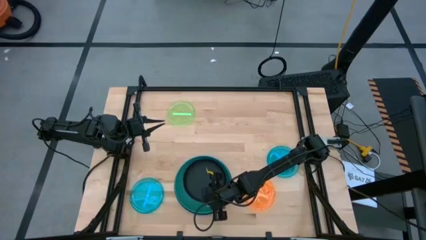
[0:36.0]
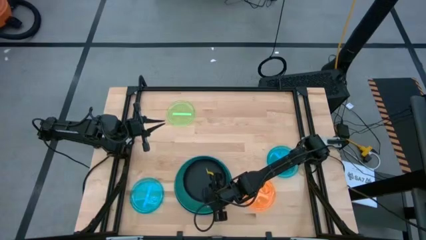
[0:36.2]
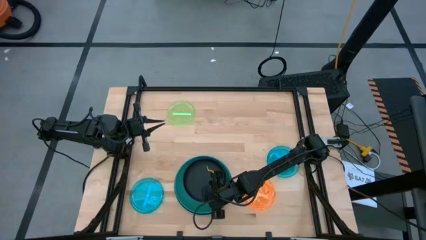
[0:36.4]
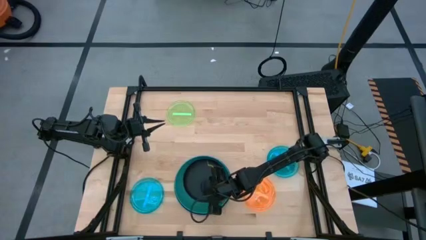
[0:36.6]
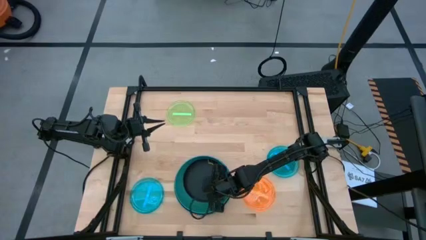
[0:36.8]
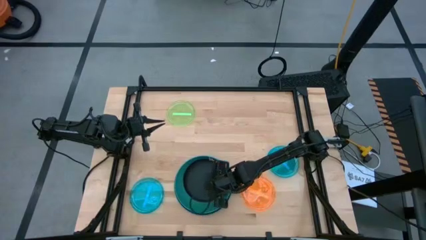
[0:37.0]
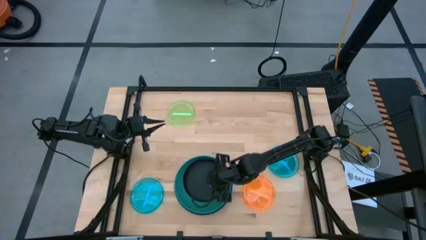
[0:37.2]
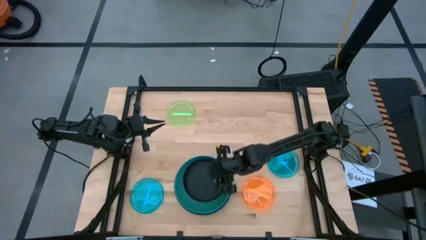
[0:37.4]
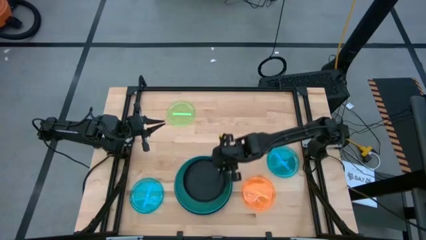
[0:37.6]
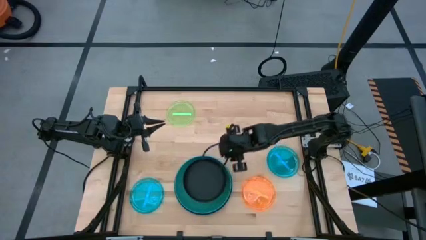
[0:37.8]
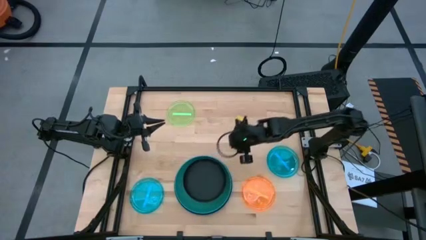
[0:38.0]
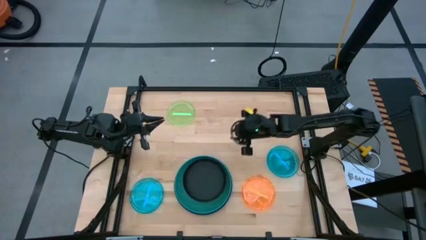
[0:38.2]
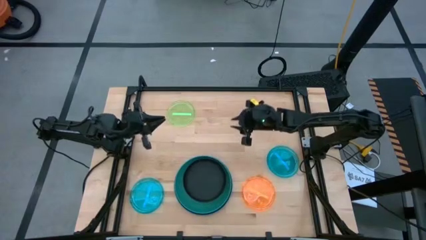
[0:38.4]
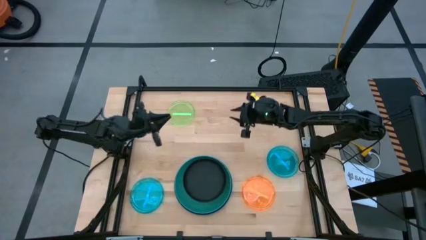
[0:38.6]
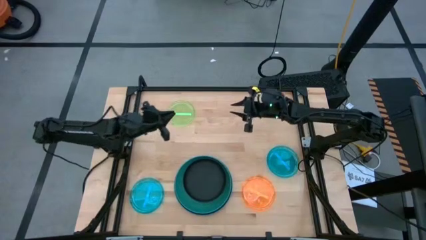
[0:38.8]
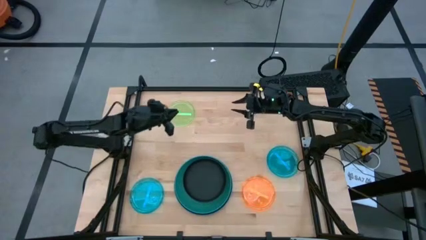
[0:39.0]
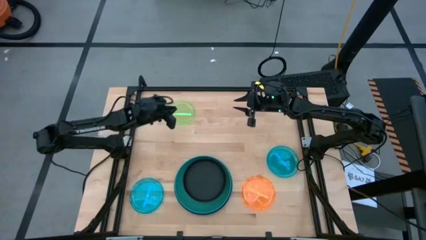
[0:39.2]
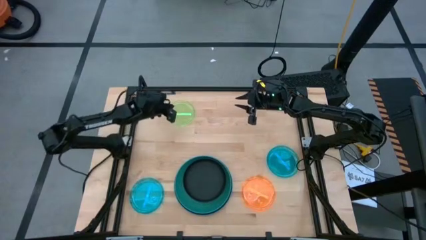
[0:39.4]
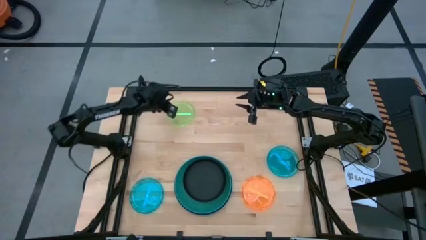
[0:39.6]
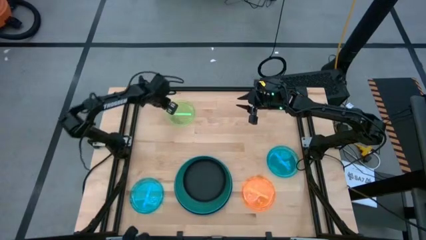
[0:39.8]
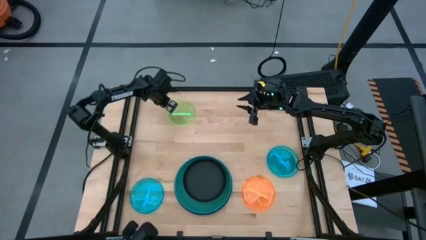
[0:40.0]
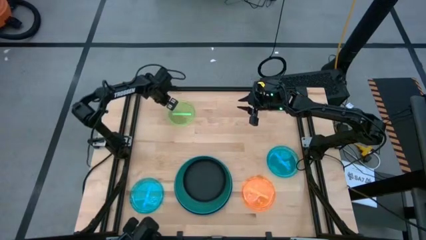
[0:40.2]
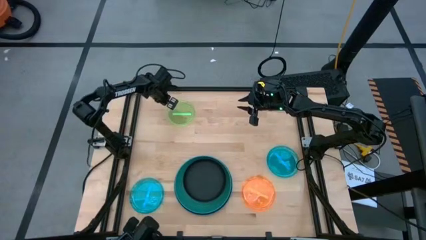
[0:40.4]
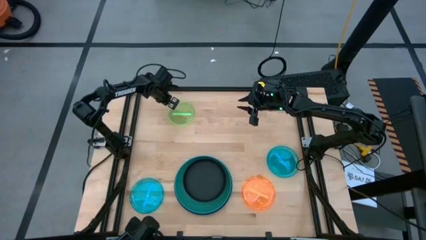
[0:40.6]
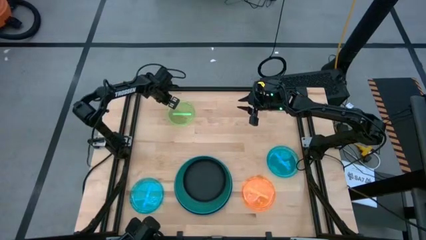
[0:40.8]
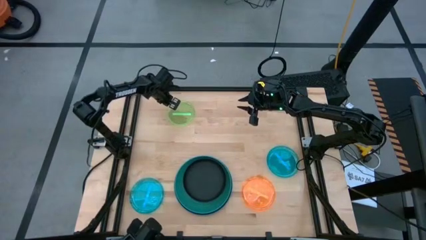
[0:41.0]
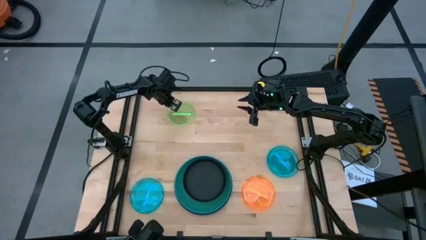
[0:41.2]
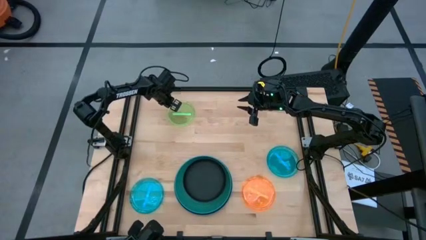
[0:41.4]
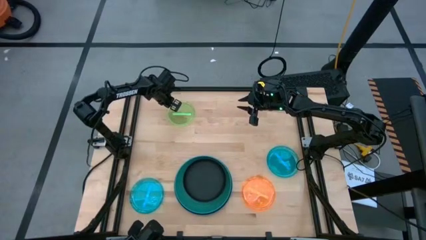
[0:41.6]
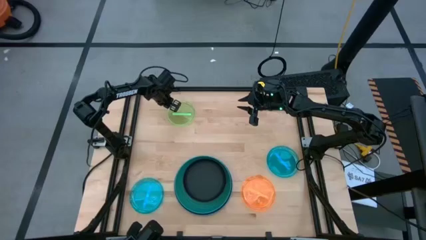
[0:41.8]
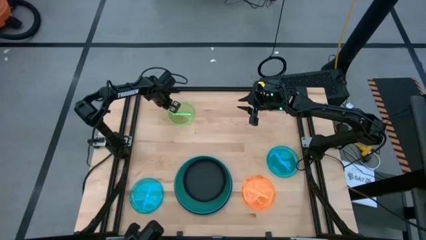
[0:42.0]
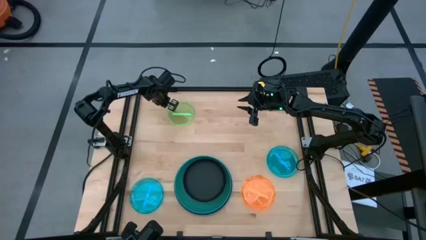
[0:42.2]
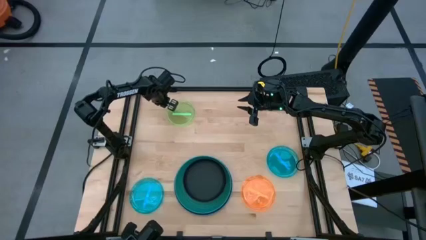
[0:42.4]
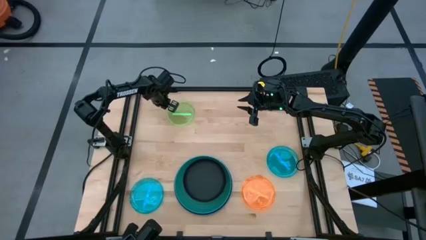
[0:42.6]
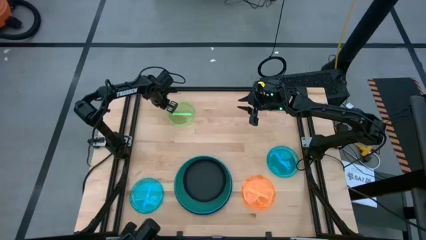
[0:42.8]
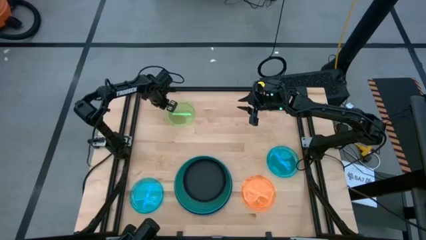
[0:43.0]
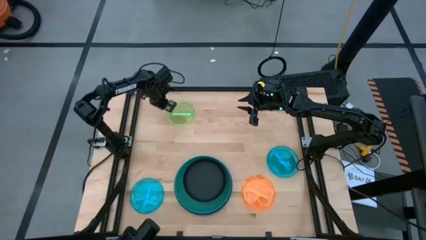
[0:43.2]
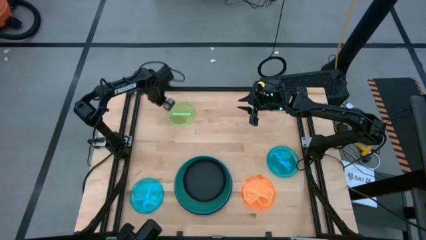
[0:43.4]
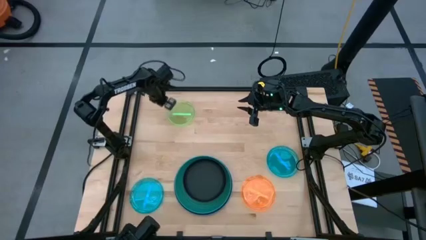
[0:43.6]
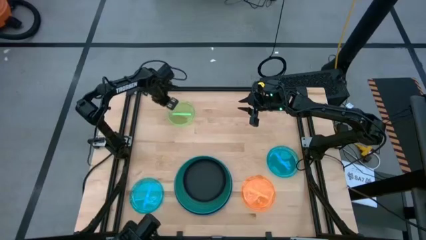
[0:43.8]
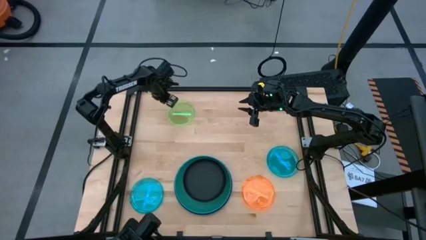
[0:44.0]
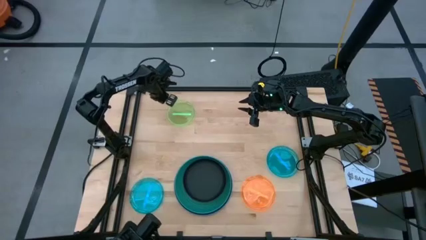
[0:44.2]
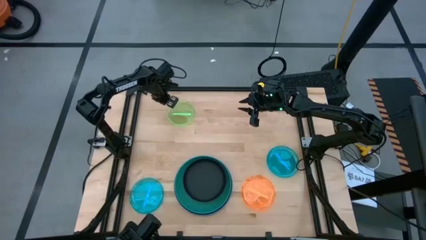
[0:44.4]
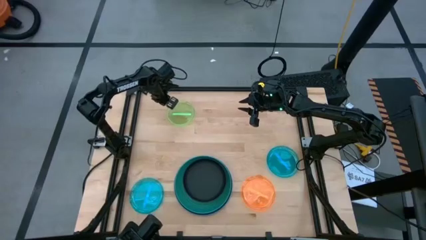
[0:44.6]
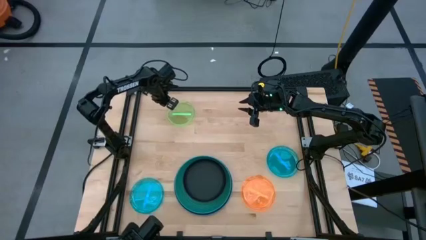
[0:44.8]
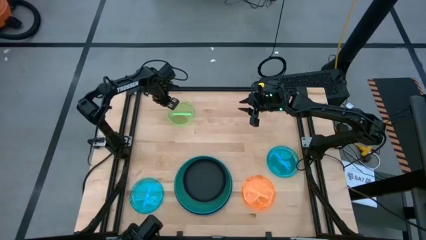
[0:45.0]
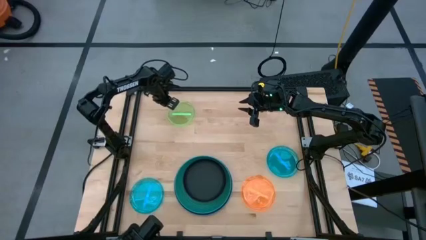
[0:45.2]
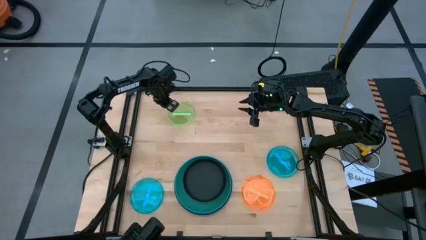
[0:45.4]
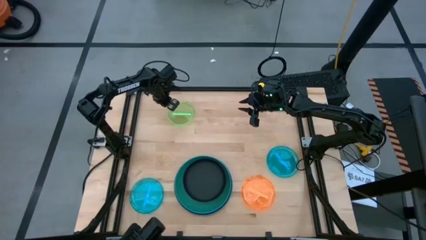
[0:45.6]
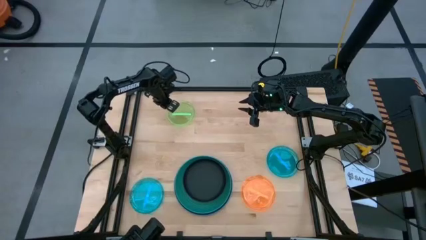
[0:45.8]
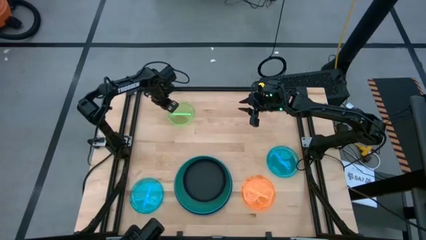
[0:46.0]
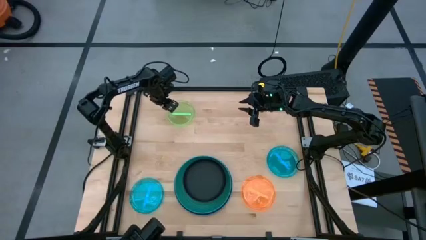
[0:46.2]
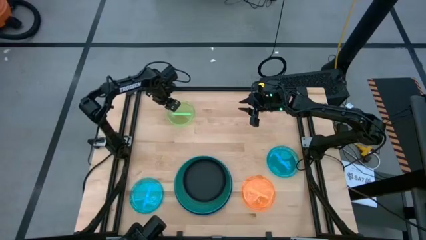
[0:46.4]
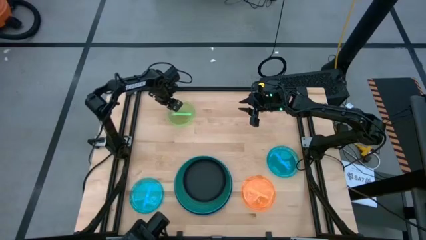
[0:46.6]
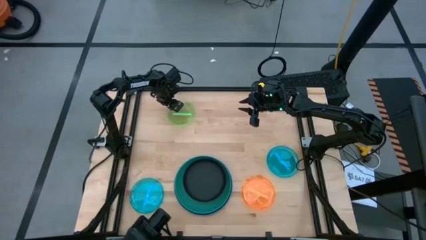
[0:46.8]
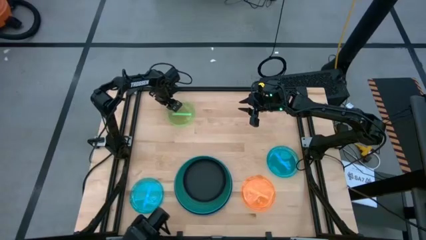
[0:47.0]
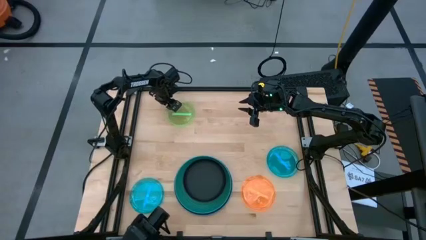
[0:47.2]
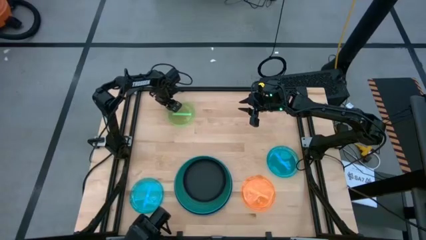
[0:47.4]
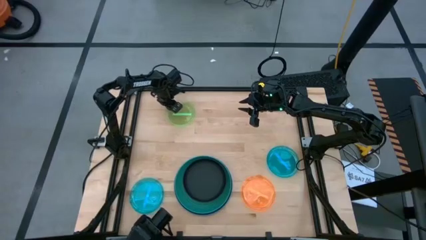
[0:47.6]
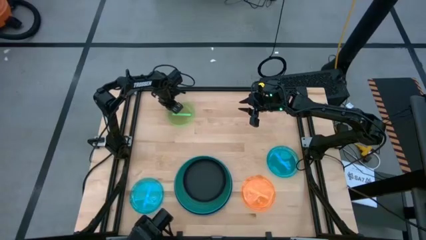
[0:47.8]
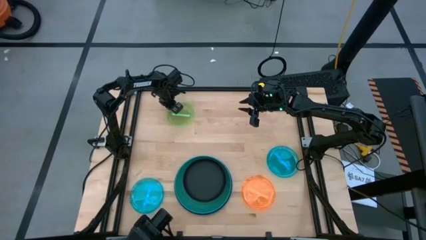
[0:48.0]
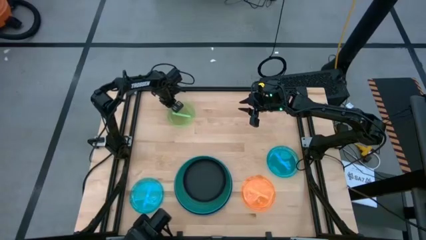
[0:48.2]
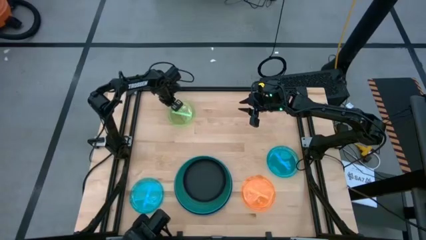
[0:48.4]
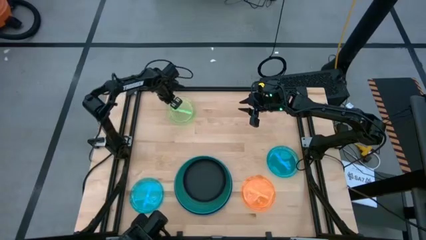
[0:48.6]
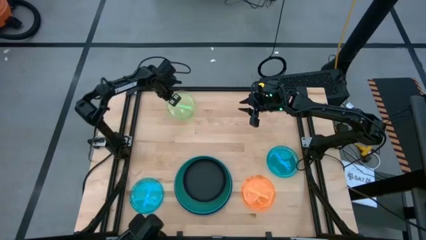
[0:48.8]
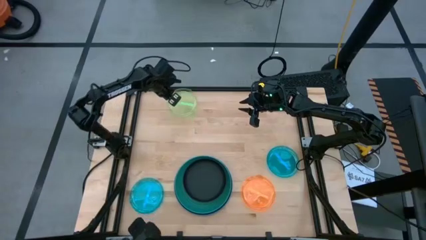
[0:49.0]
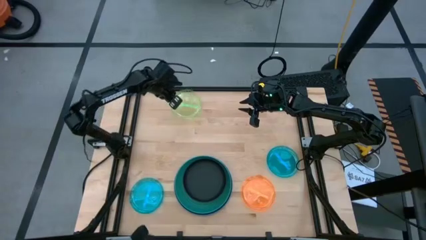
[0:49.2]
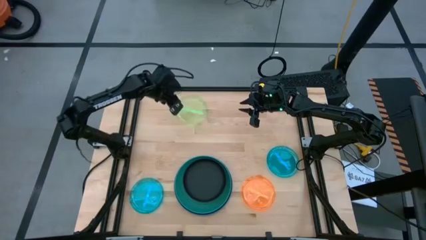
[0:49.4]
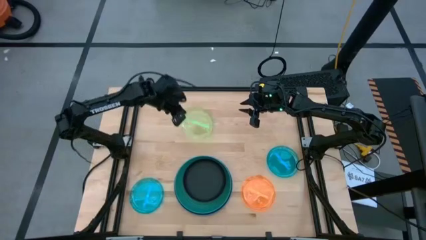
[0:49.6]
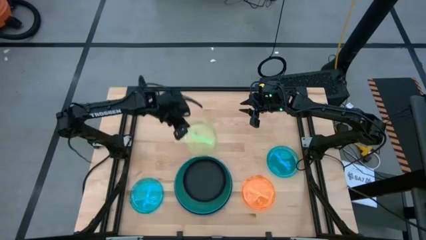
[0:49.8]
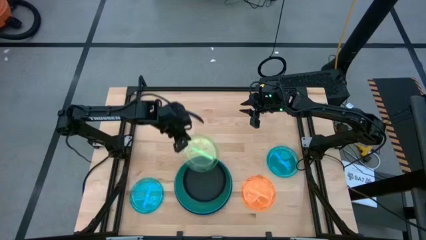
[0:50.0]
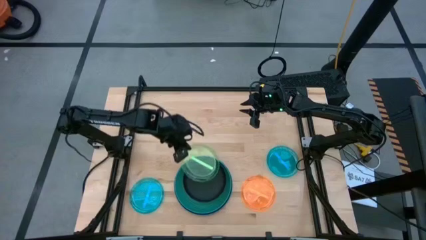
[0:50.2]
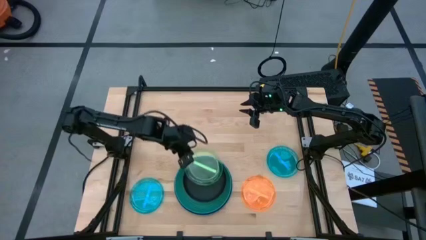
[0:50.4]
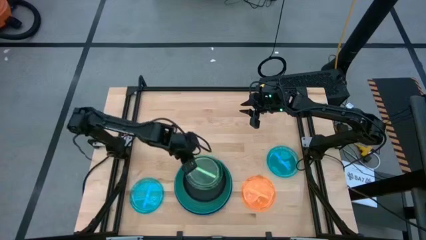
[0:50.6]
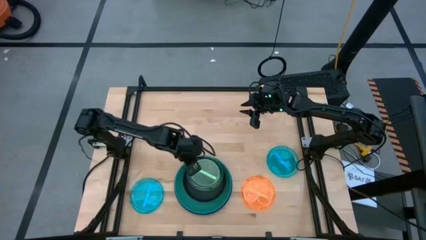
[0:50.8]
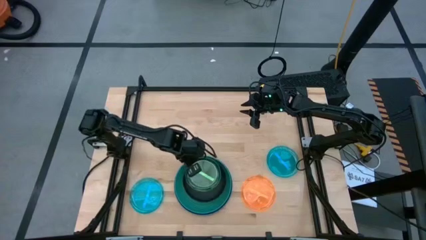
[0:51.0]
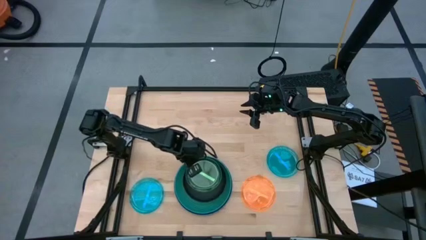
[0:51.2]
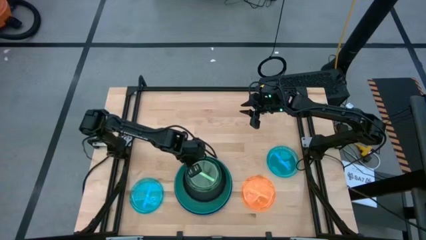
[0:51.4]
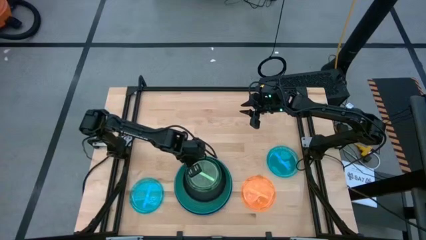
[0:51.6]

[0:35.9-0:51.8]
Task: Stack plastic plates
Stack the light green plate on top of the black plate
